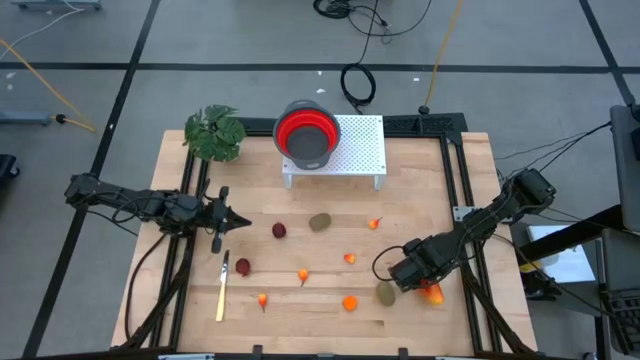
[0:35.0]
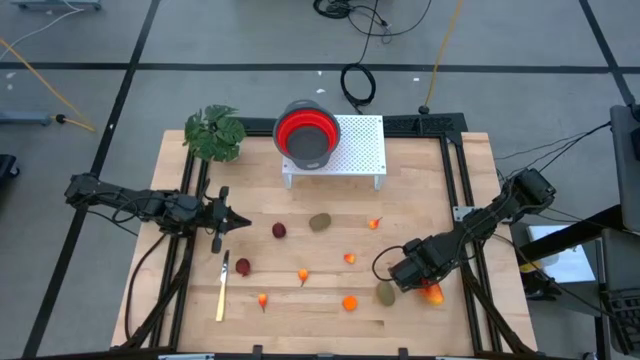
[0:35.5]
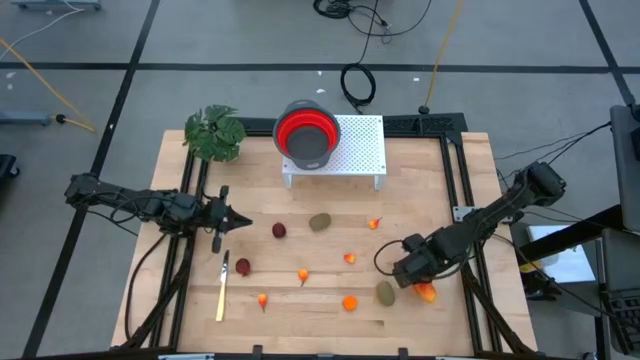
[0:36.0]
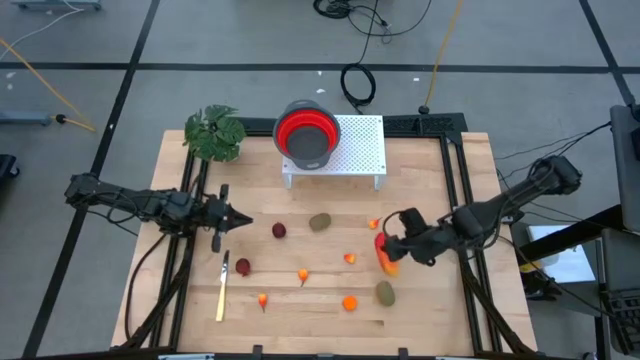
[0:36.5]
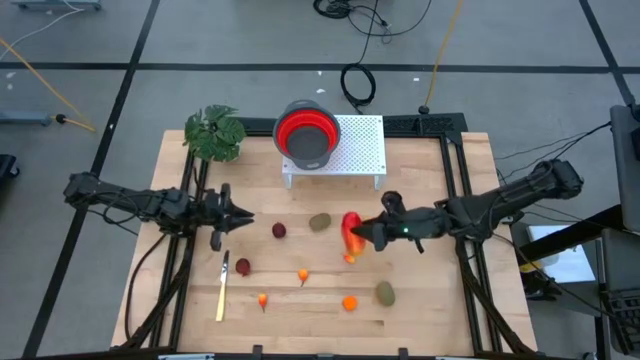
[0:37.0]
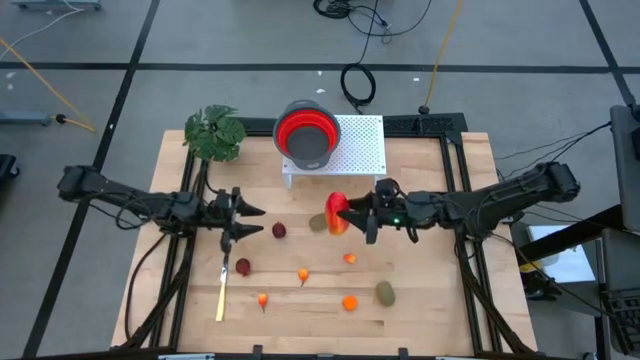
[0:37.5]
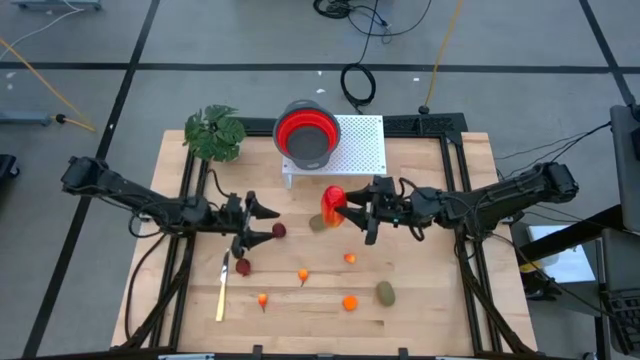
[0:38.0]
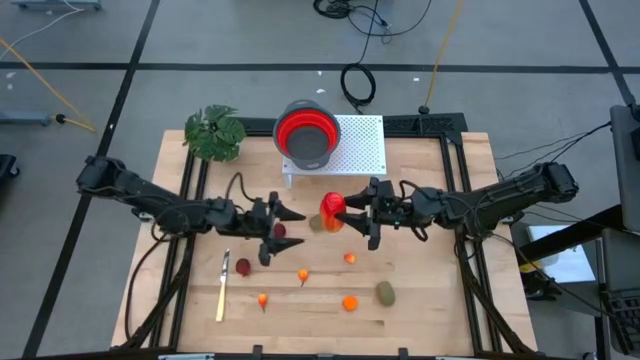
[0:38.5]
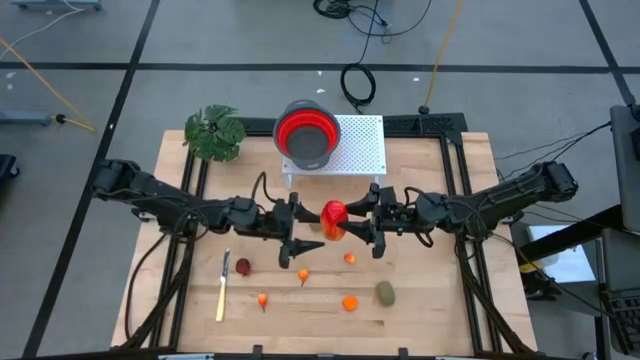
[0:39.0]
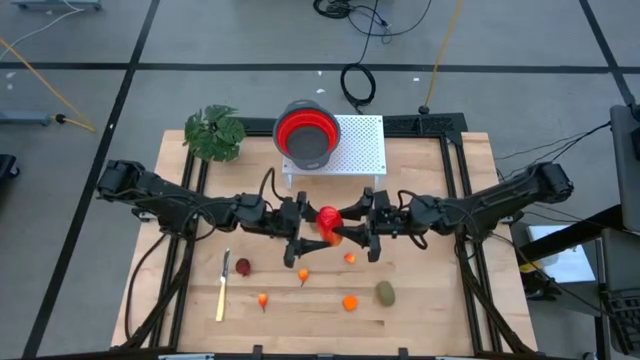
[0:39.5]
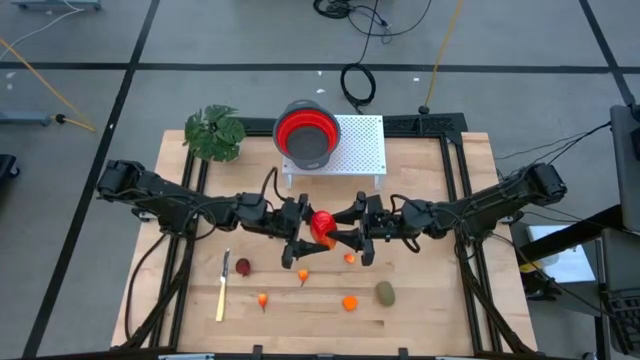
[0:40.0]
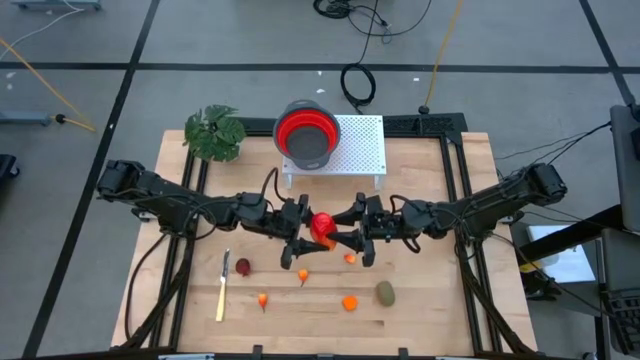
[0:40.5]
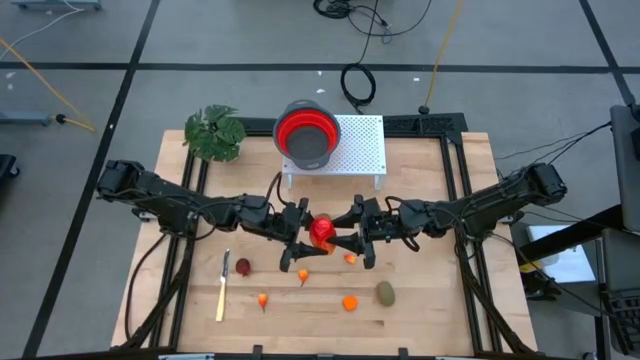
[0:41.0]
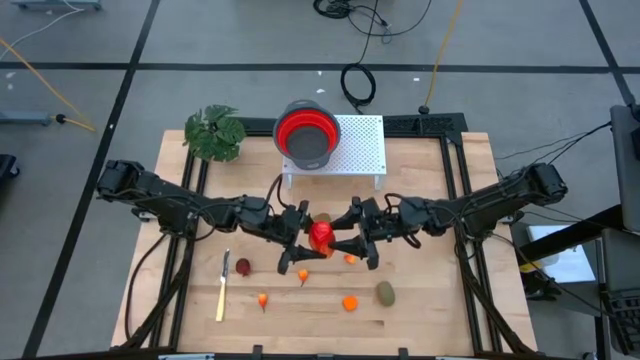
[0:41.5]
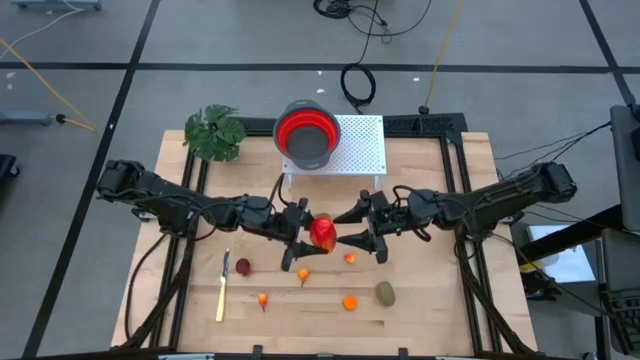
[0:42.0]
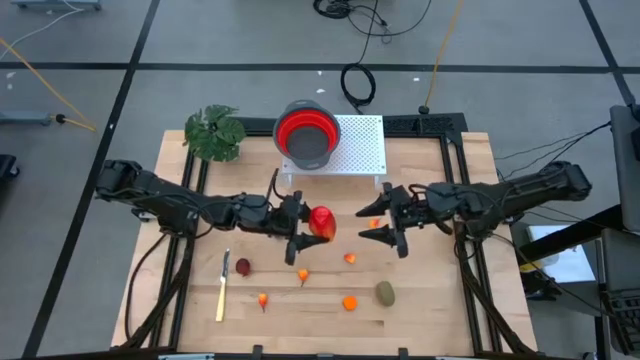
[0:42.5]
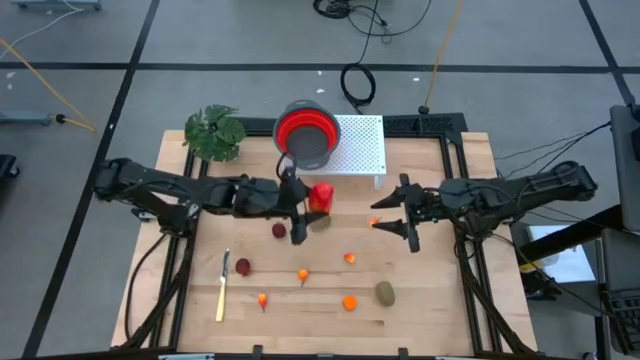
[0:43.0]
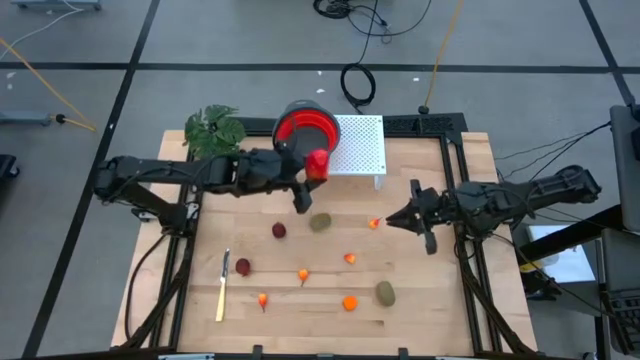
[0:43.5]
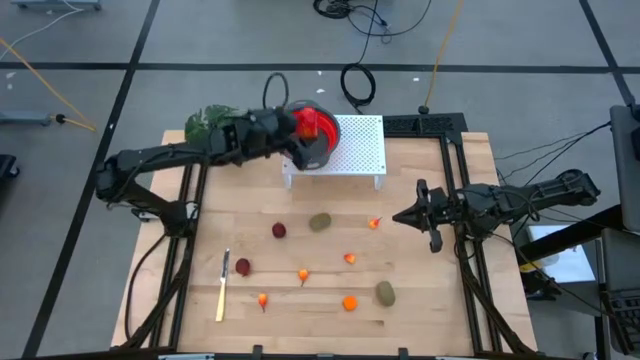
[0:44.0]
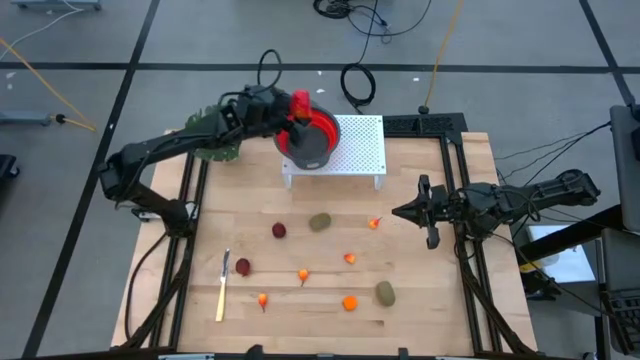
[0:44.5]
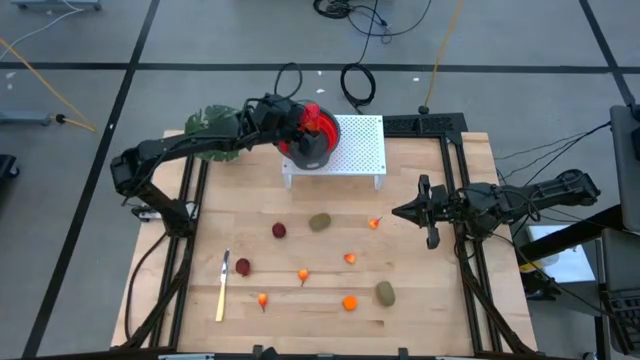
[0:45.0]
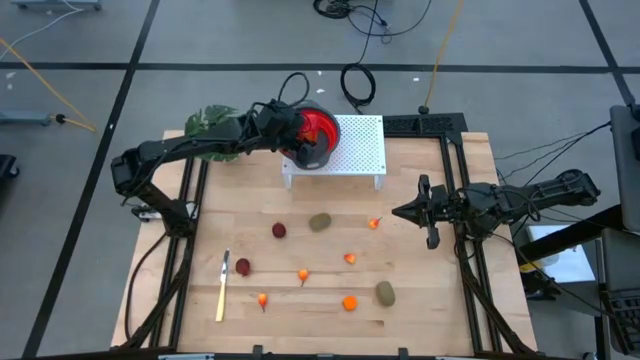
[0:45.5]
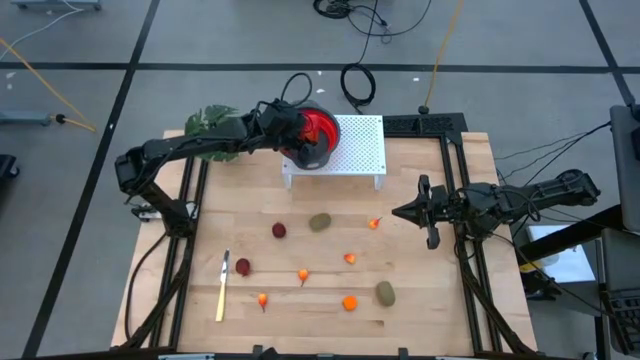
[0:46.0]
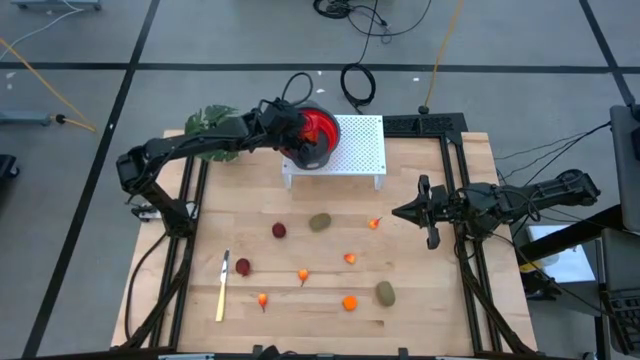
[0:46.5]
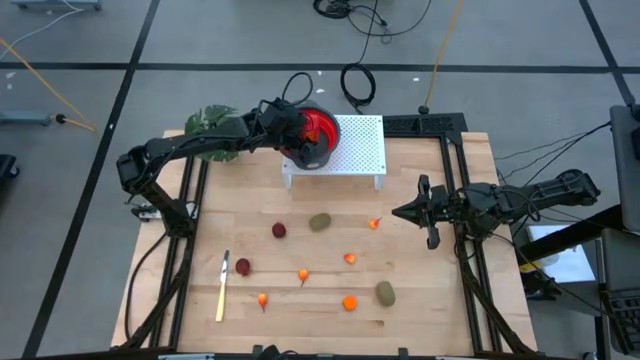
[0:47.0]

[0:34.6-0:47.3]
Task: Pick & Place Fruit
Put the mango into the red strainer bowl on the shelf

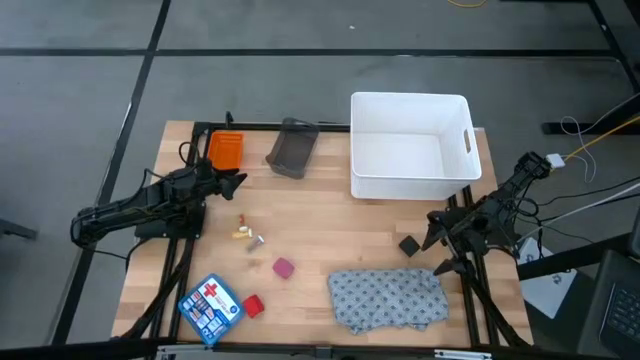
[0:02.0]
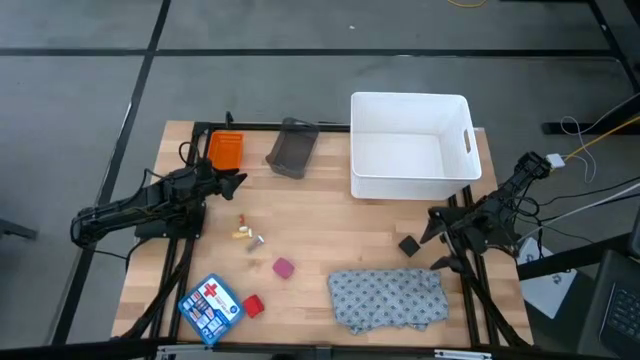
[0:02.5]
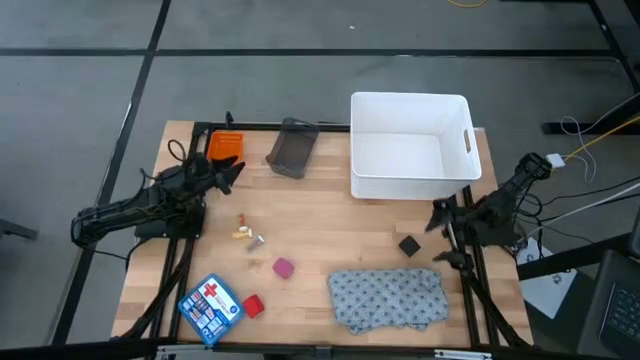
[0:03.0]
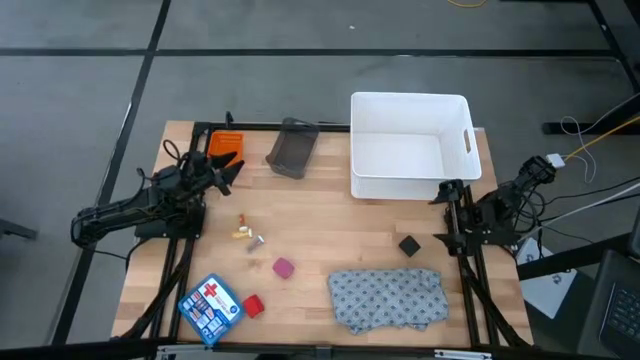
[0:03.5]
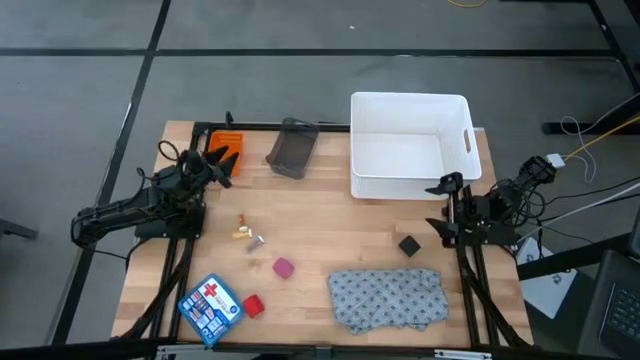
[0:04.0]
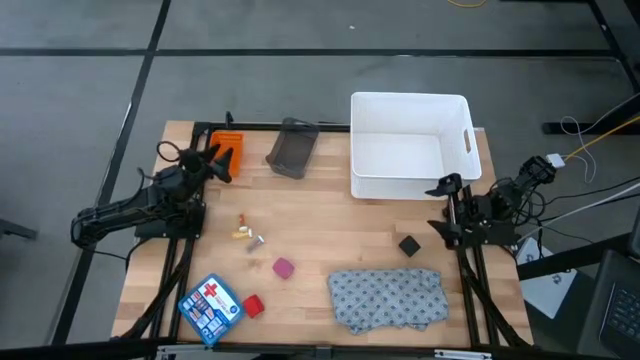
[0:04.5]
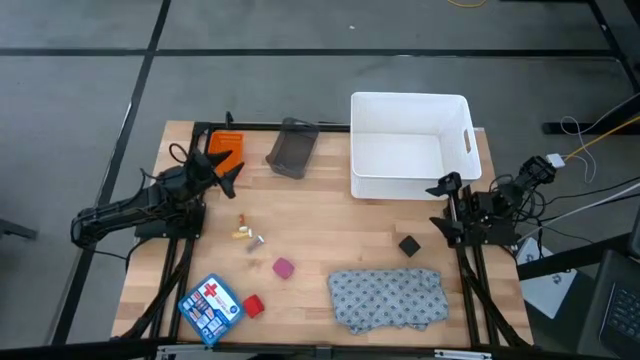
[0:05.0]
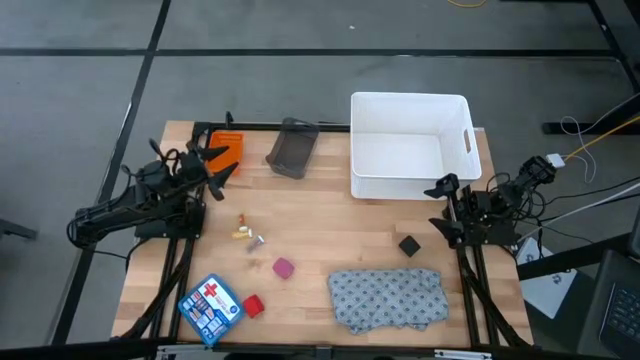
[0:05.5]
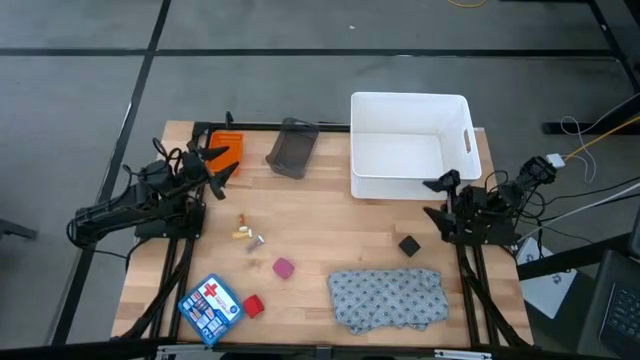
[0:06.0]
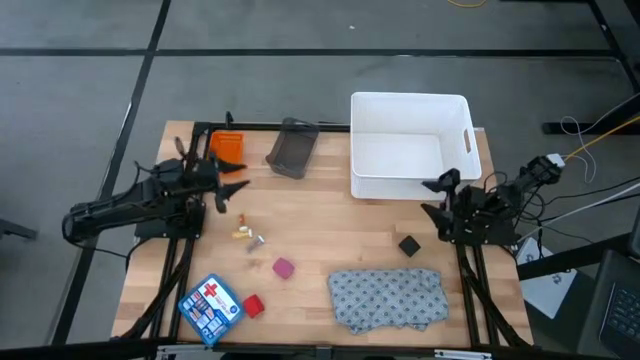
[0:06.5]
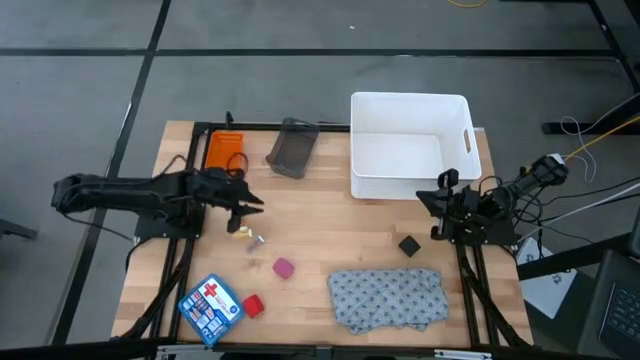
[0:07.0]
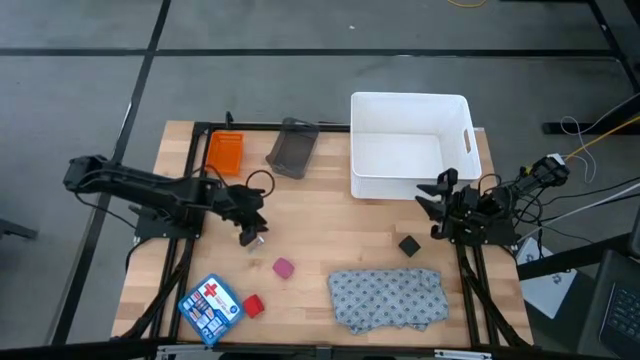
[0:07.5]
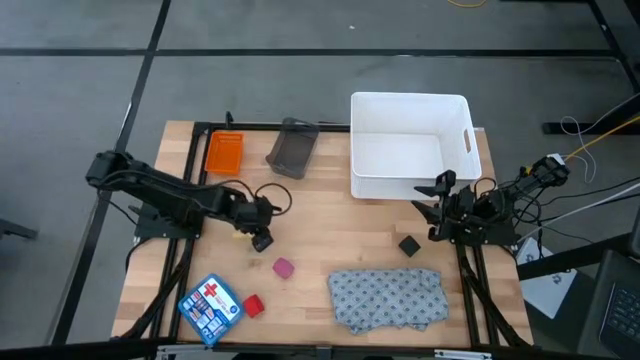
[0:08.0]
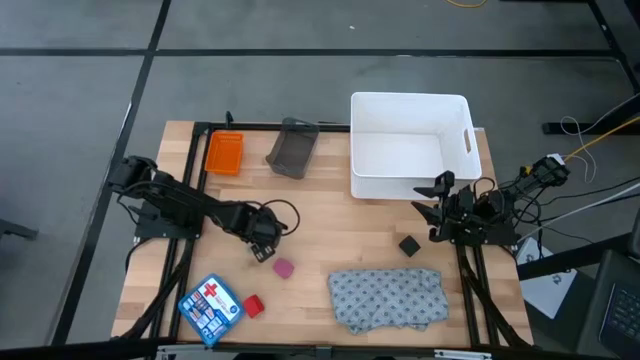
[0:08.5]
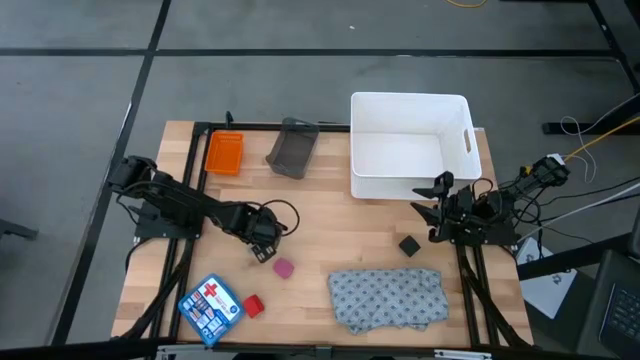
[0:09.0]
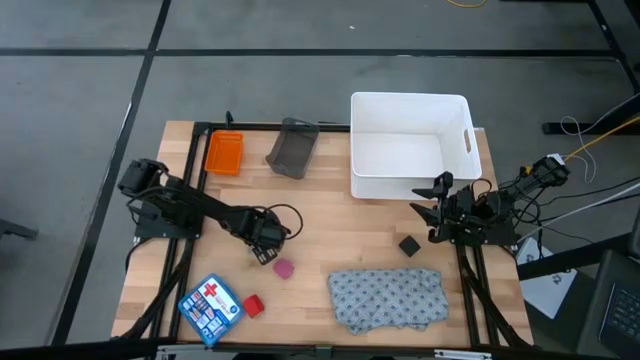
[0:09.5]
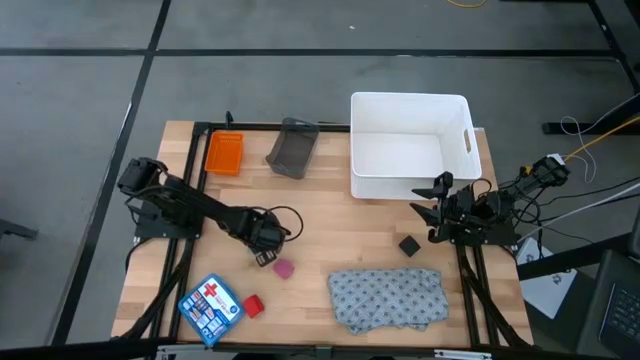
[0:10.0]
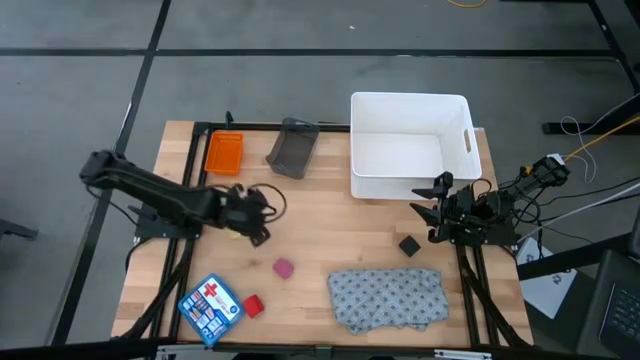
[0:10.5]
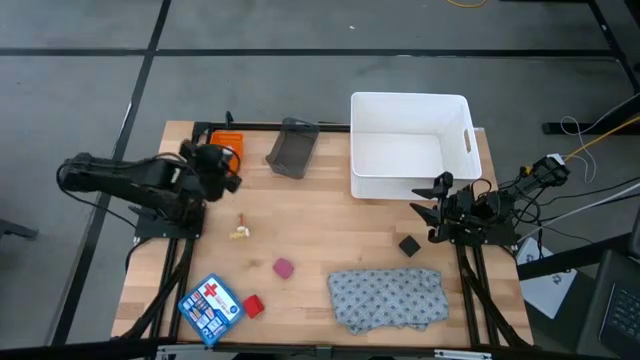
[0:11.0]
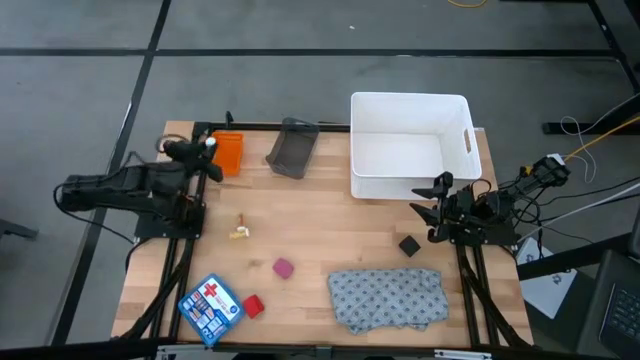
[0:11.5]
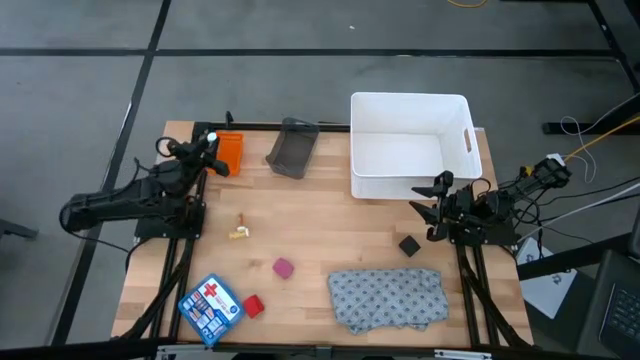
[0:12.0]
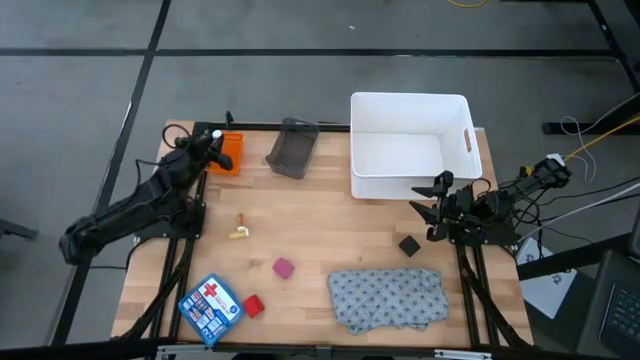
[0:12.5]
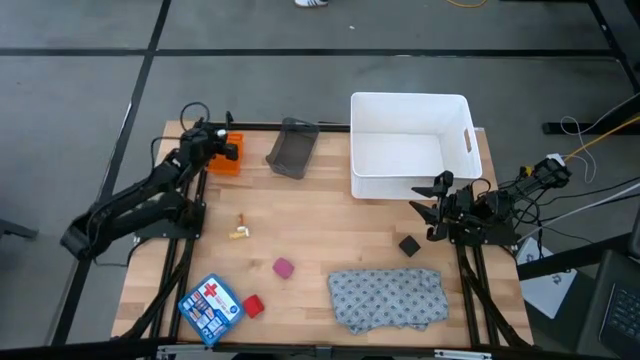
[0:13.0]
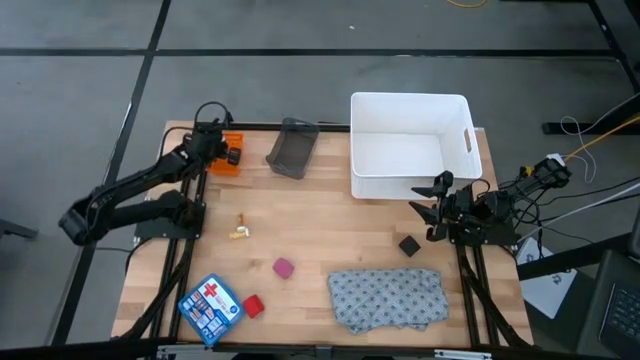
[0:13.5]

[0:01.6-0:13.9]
Task: Pick & place medical supplies in basket/bin
Put the blue pill bottle into the orange bin
